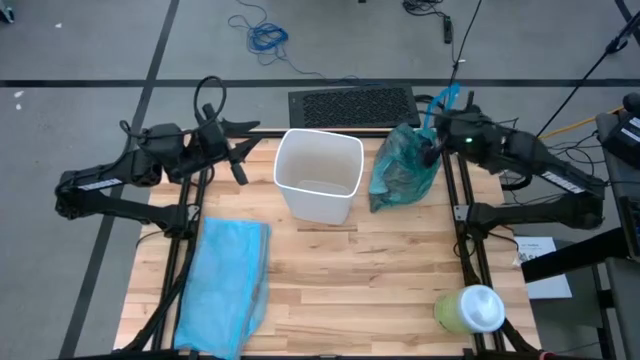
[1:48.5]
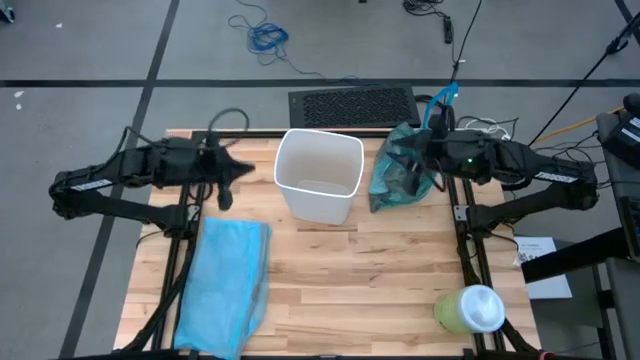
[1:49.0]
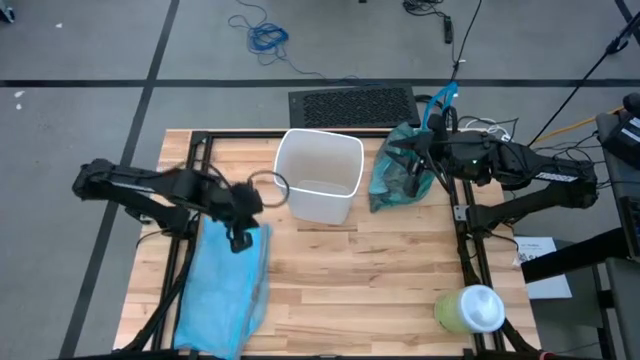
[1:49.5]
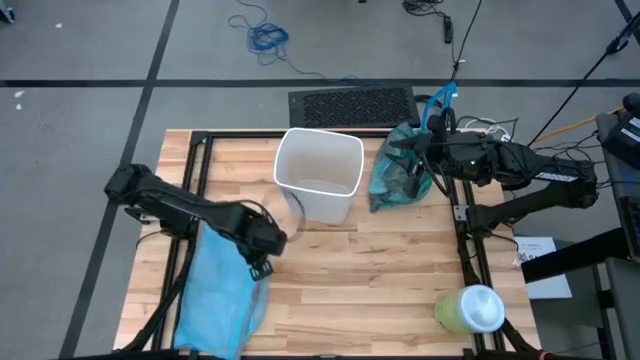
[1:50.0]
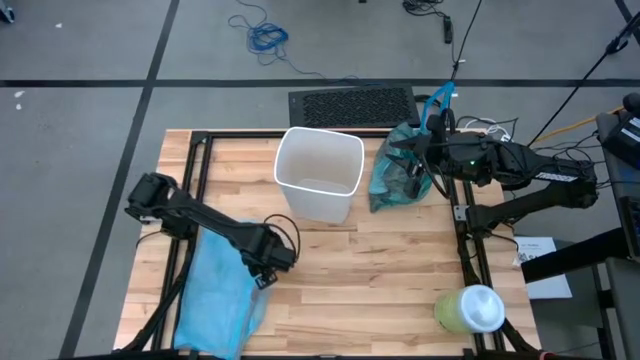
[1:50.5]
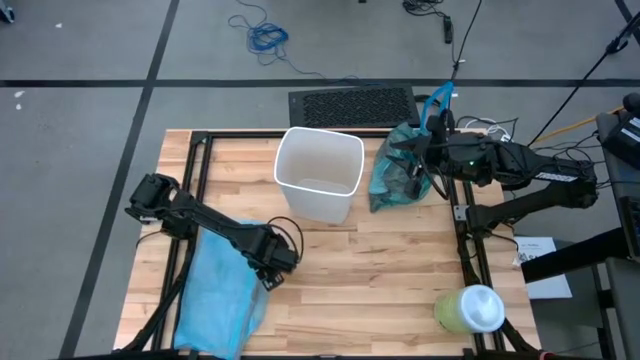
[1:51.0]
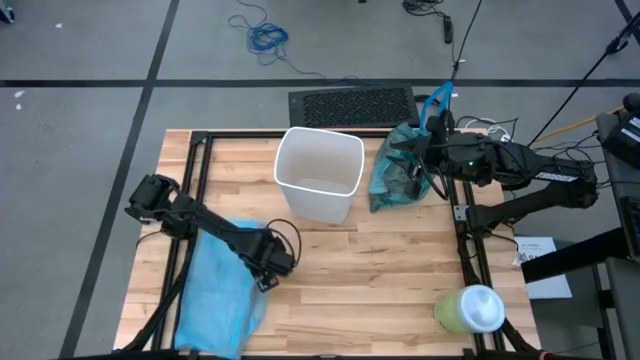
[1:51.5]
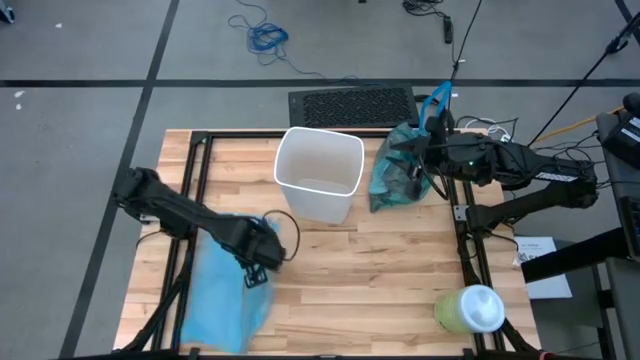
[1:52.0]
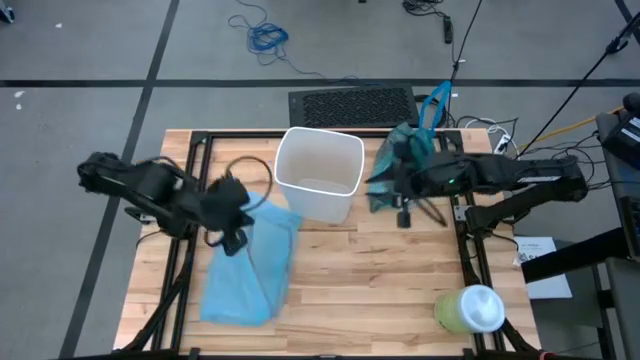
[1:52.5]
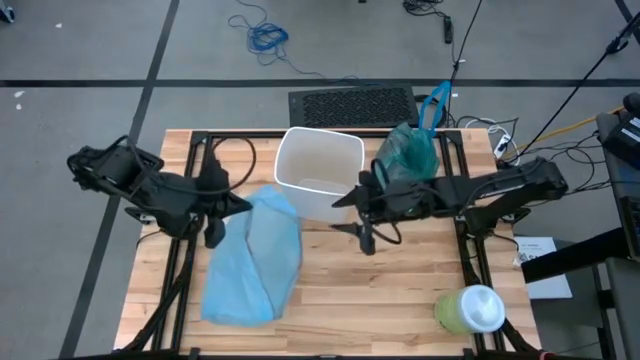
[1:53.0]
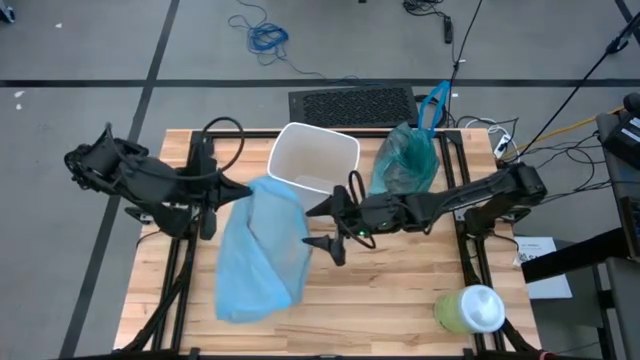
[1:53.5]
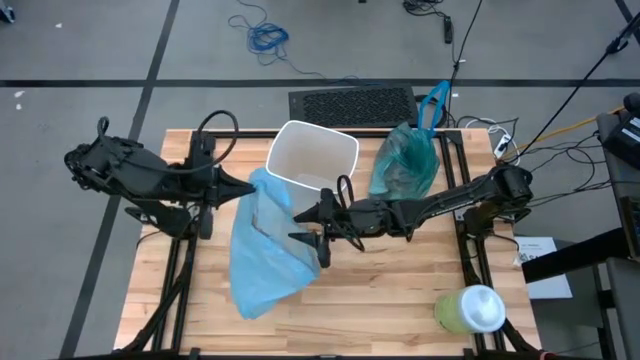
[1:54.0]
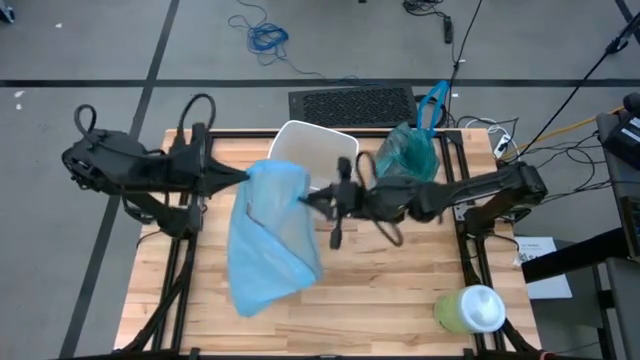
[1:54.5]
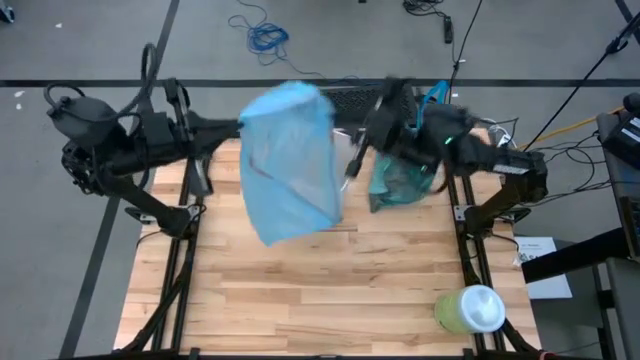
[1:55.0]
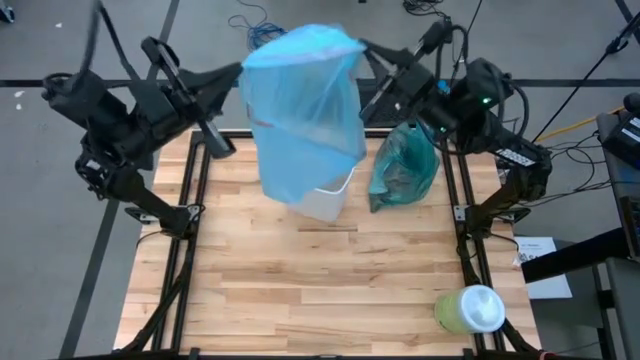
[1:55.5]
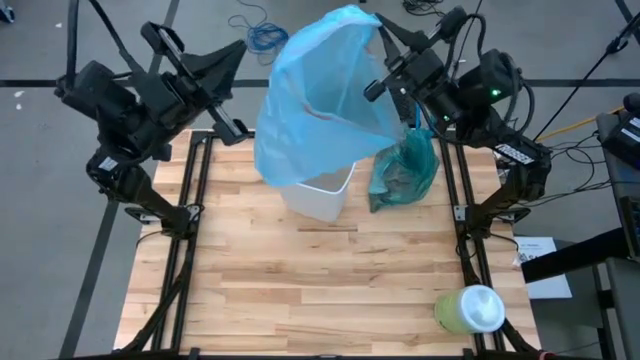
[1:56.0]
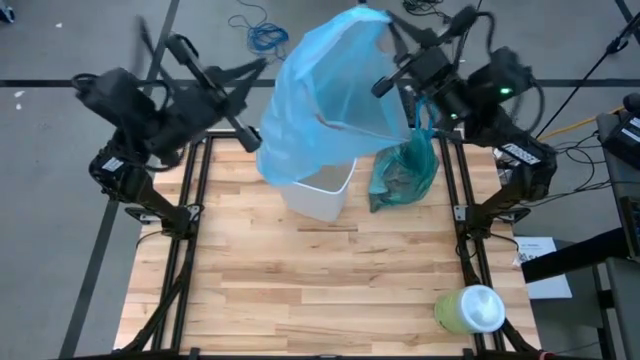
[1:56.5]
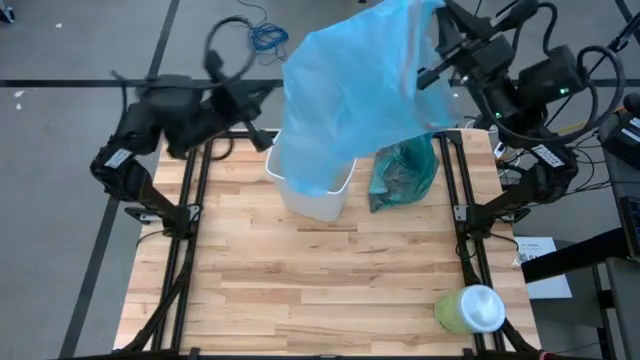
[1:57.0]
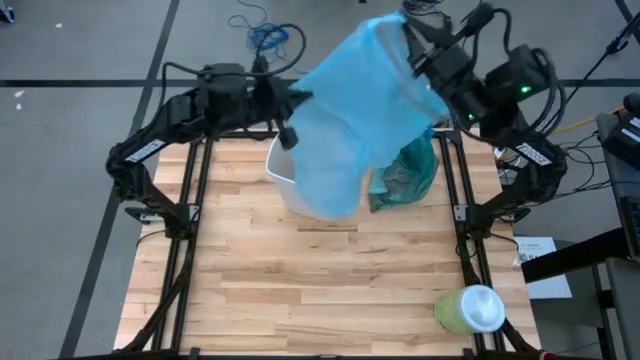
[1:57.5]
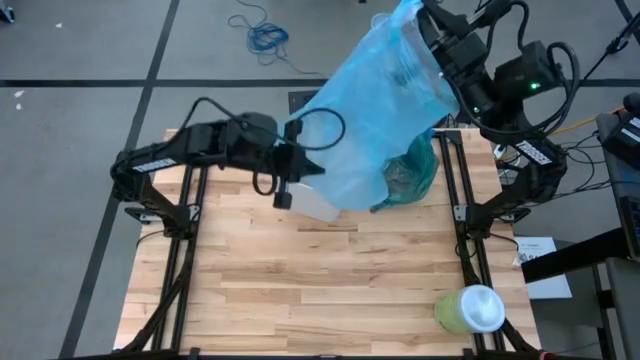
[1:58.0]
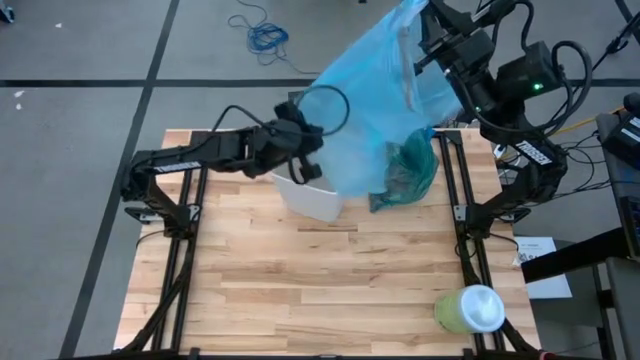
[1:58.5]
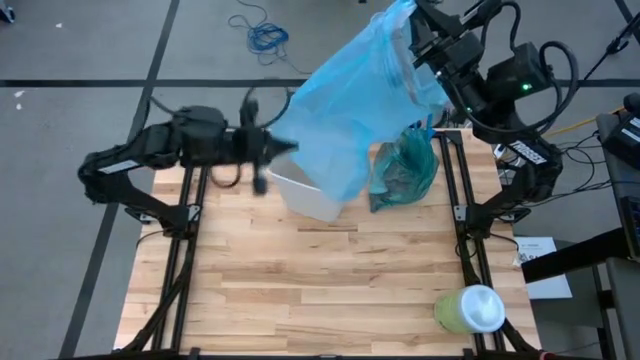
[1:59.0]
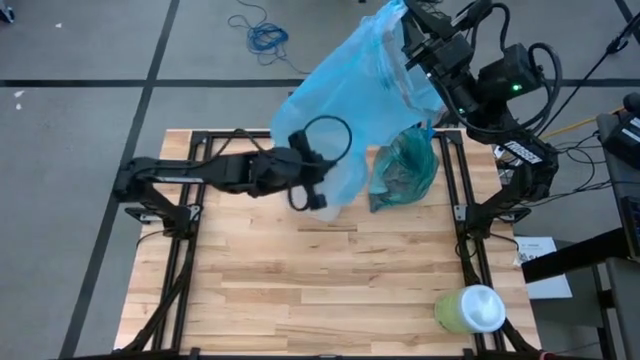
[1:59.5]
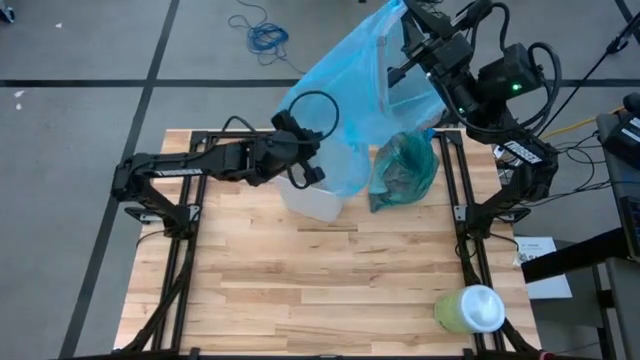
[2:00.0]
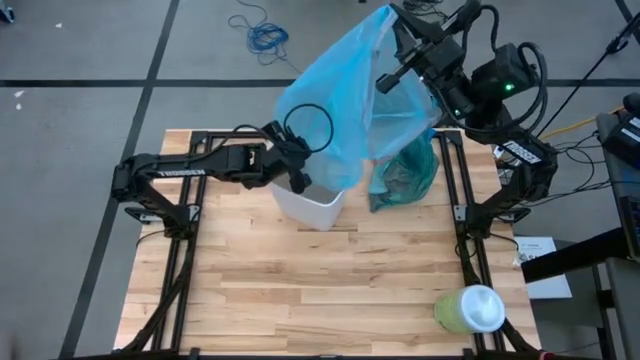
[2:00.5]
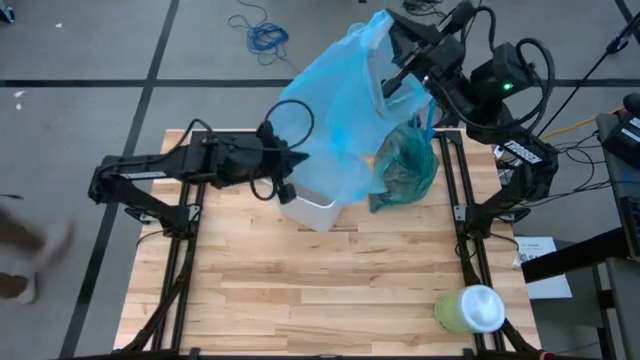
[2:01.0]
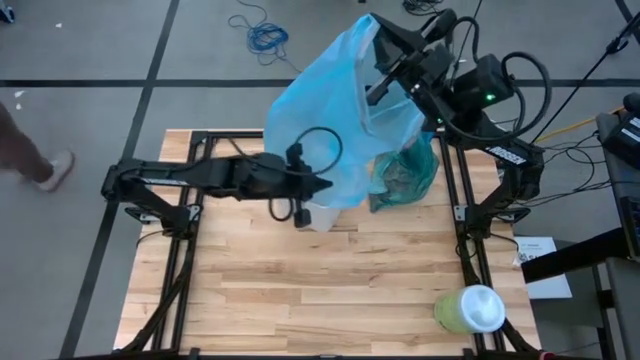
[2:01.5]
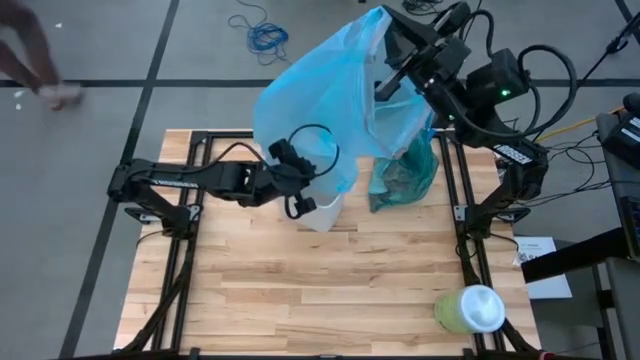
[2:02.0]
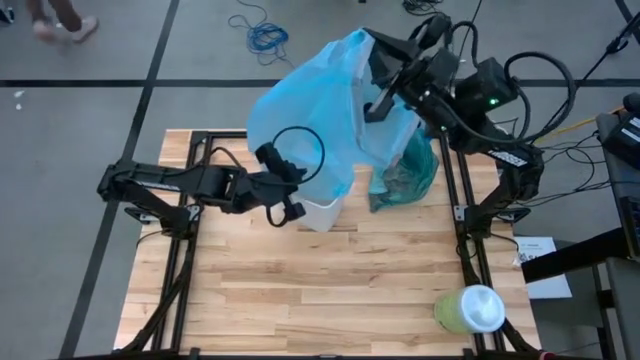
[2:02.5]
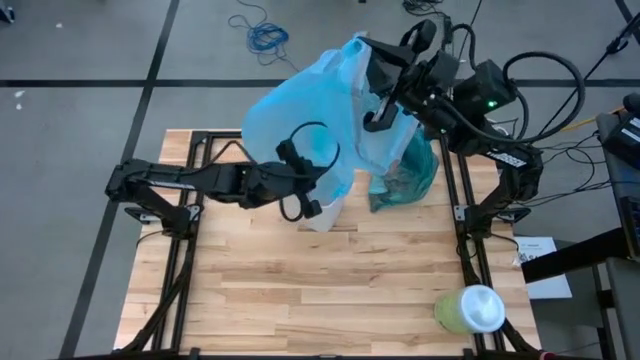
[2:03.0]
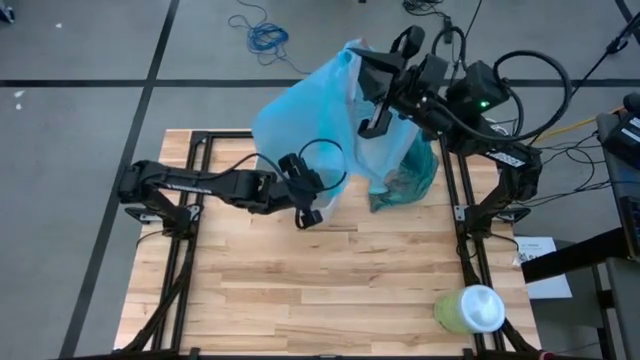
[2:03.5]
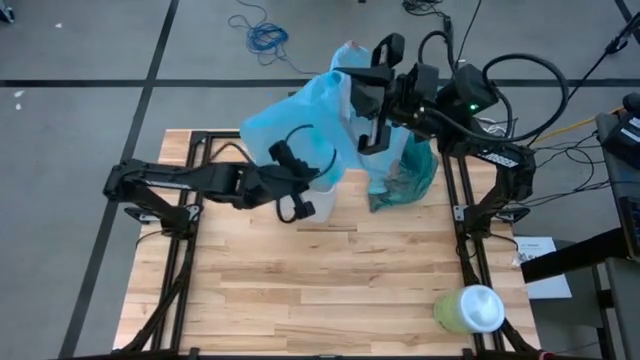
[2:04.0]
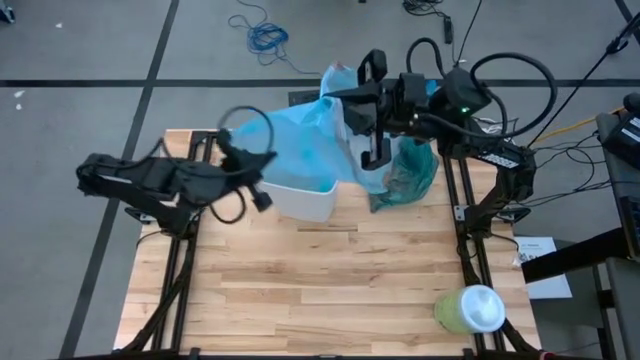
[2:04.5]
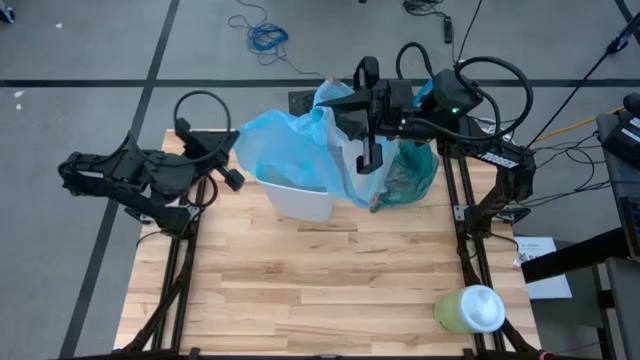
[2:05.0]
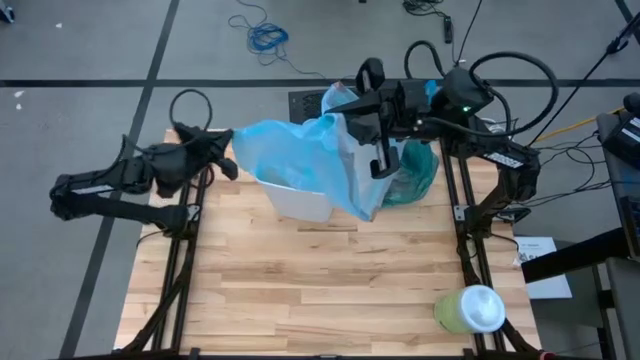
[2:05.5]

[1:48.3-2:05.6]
Task: place trash/remove bag and relplace
Insert a new trash bag into the trash bin

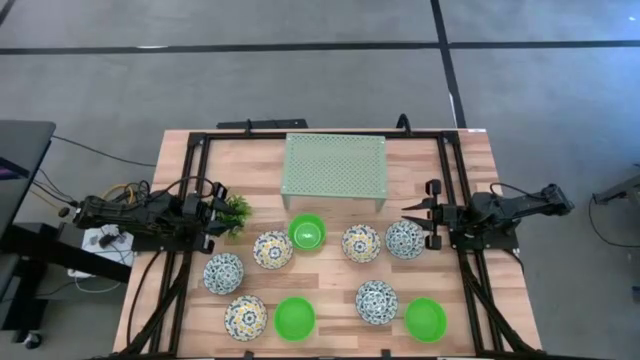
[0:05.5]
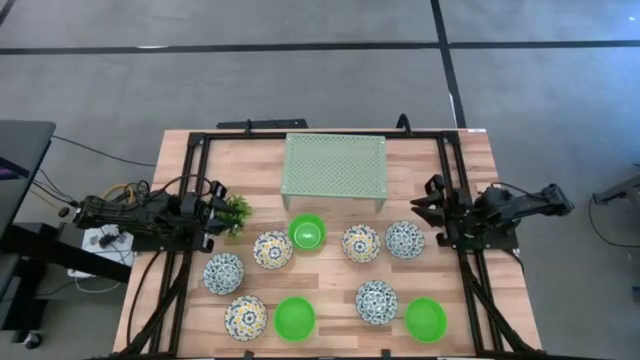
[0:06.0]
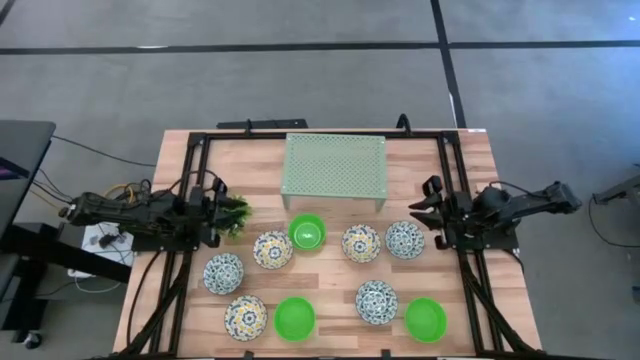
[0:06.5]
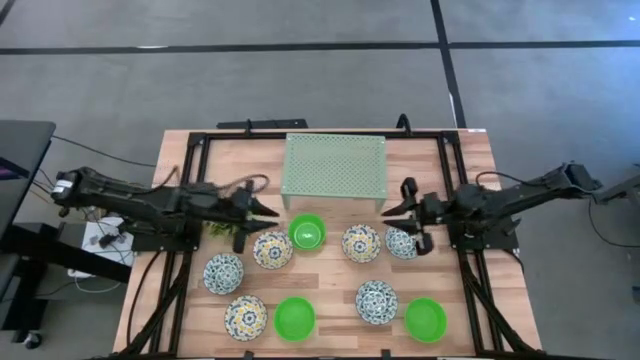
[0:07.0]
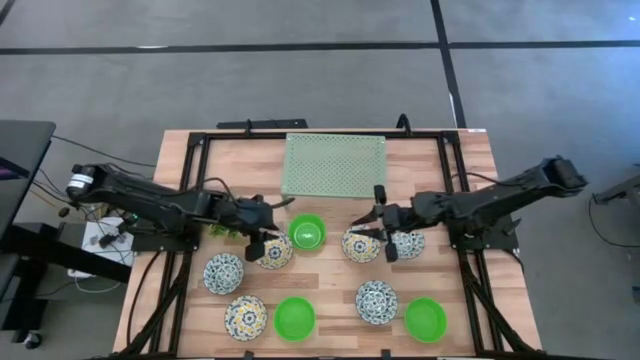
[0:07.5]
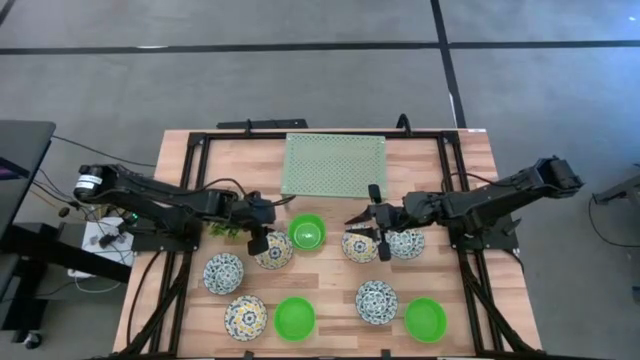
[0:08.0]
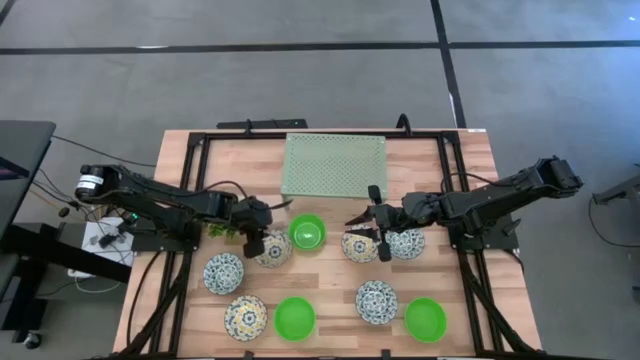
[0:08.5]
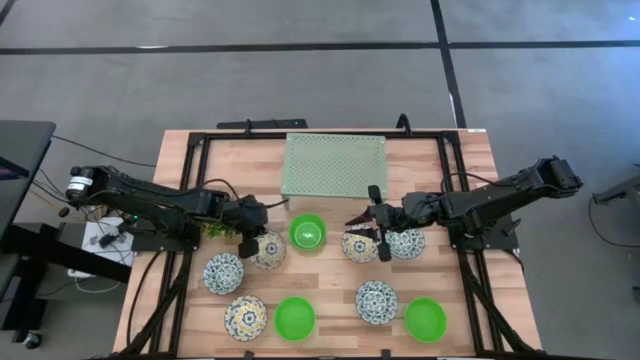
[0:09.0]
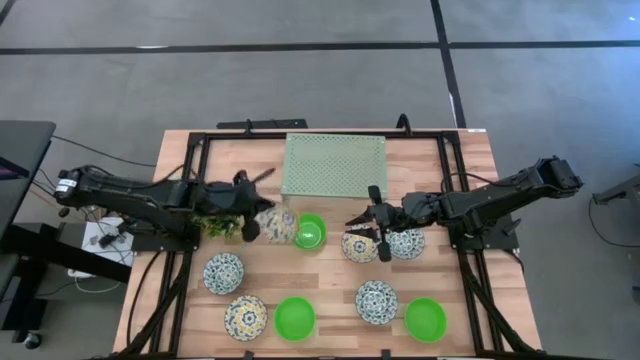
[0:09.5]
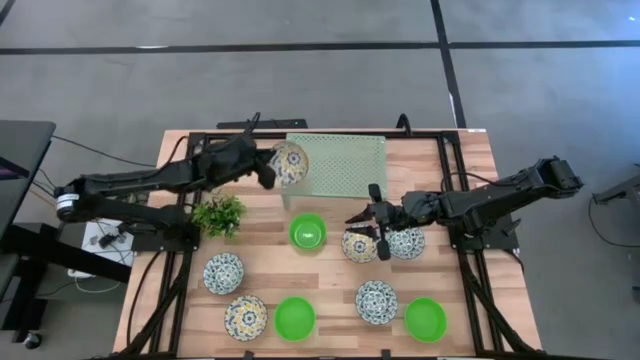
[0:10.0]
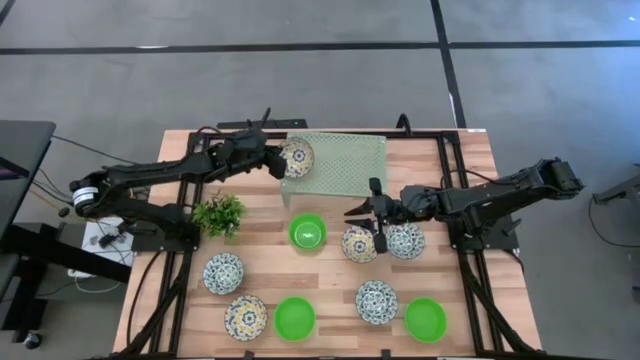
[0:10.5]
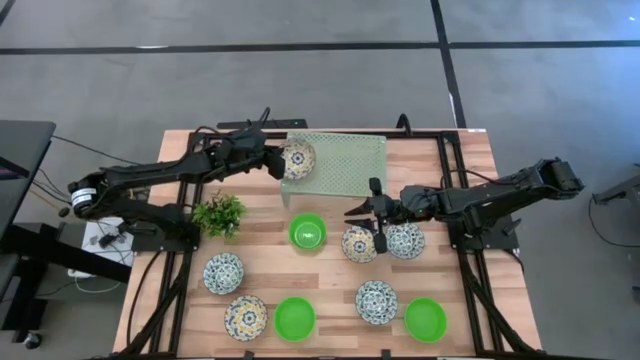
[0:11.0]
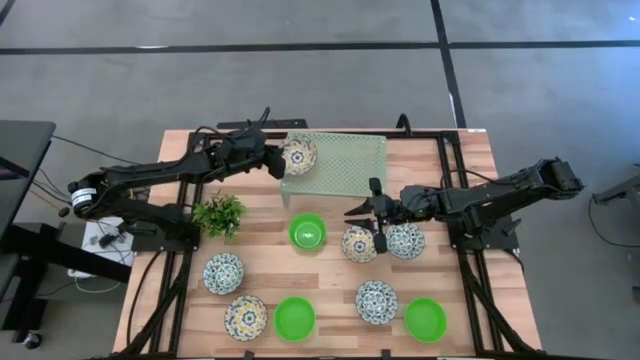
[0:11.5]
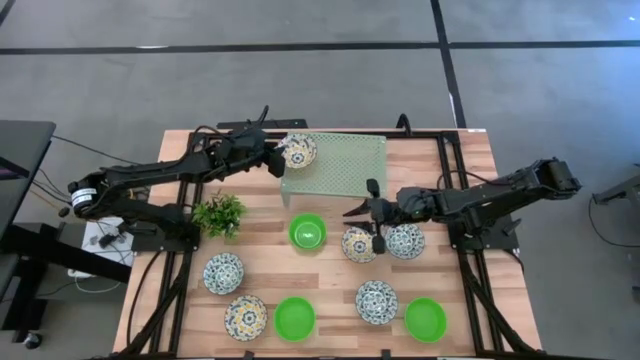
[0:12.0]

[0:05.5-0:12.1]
Task: Pick & Place Mini bowls
Put the top left yellow bowl on the shelf
